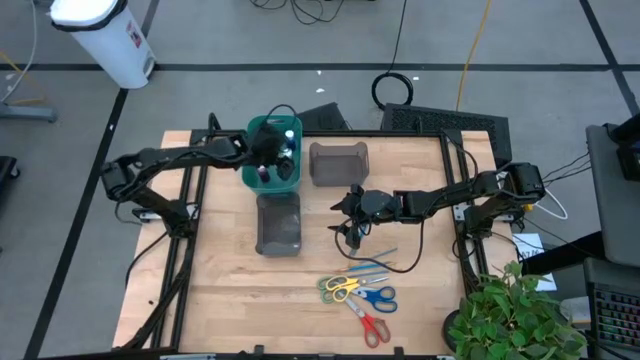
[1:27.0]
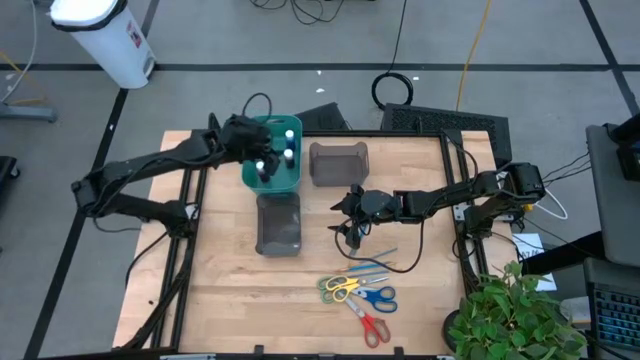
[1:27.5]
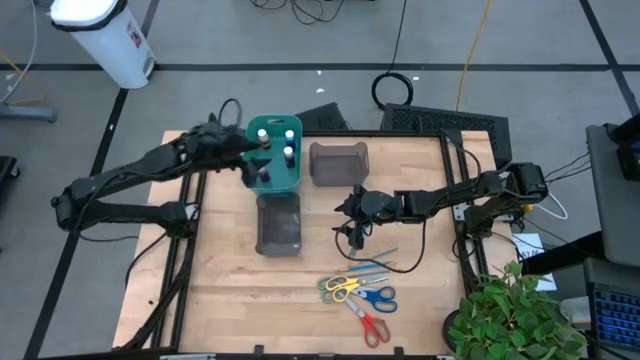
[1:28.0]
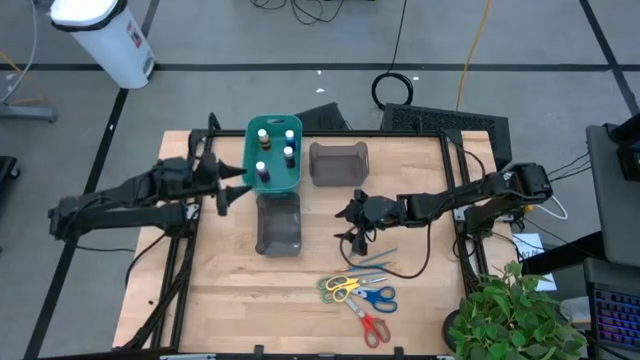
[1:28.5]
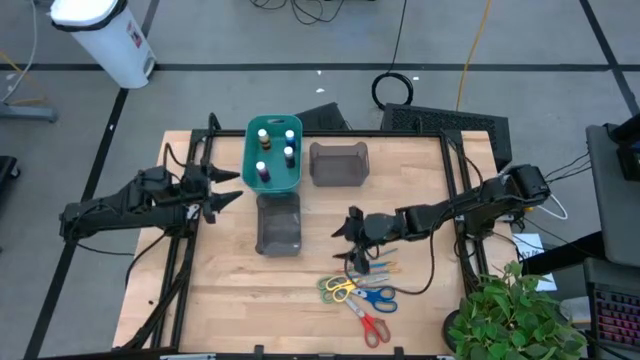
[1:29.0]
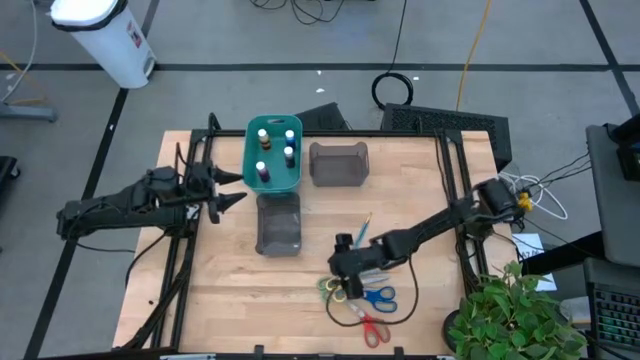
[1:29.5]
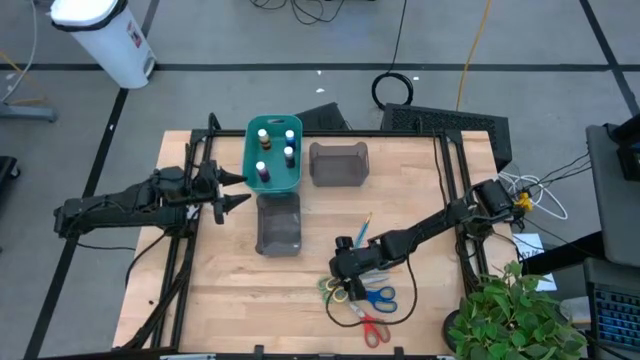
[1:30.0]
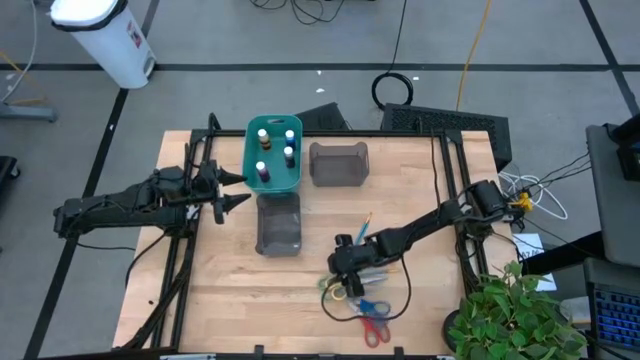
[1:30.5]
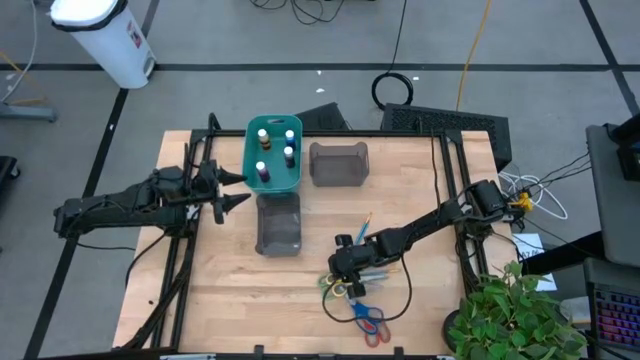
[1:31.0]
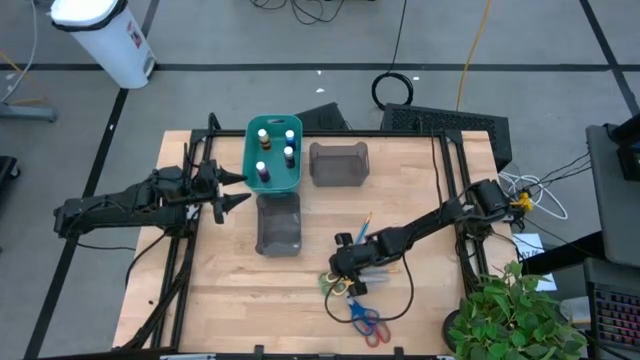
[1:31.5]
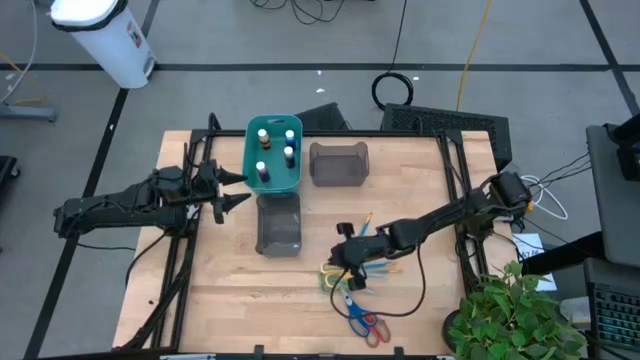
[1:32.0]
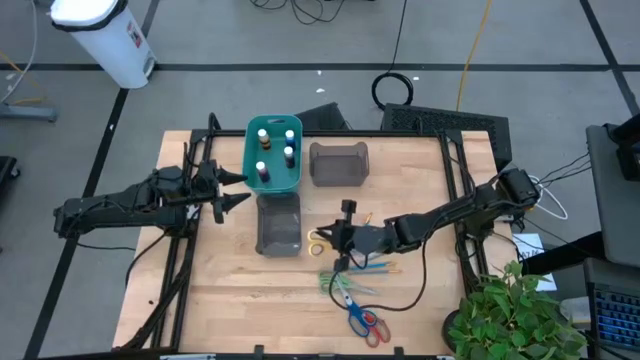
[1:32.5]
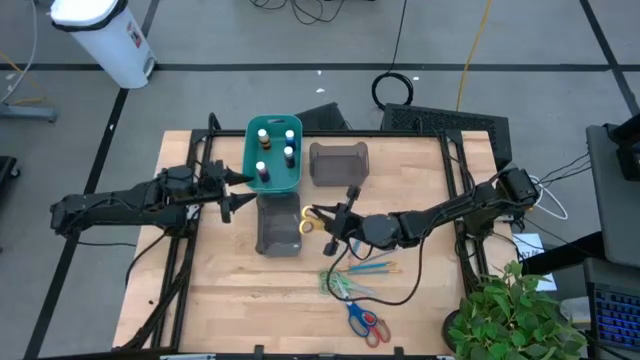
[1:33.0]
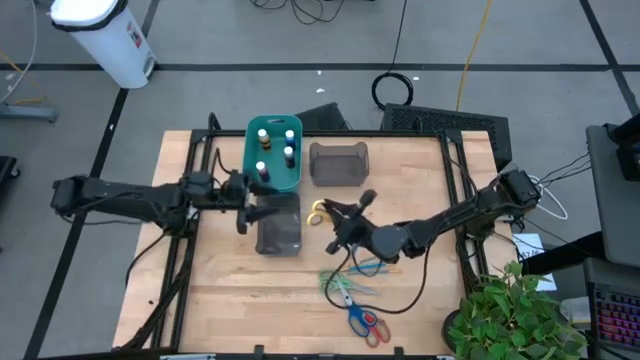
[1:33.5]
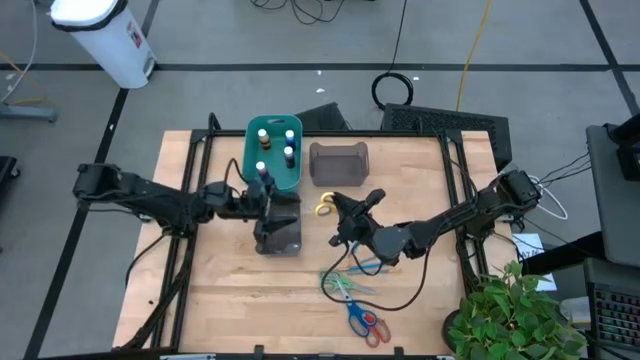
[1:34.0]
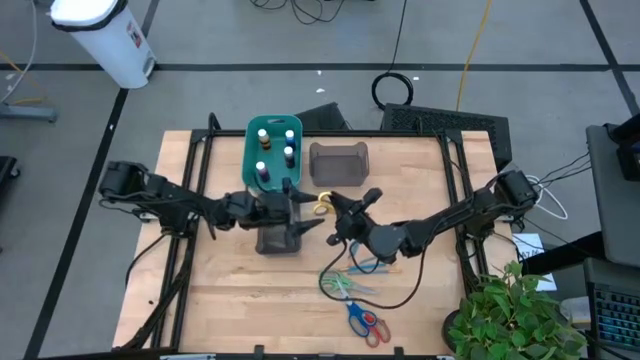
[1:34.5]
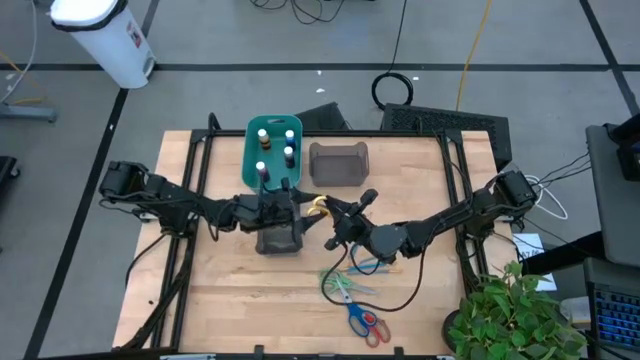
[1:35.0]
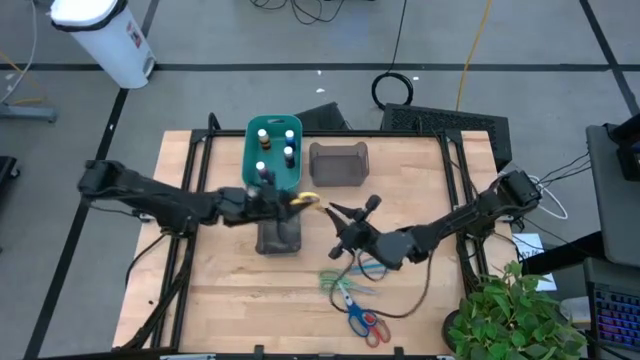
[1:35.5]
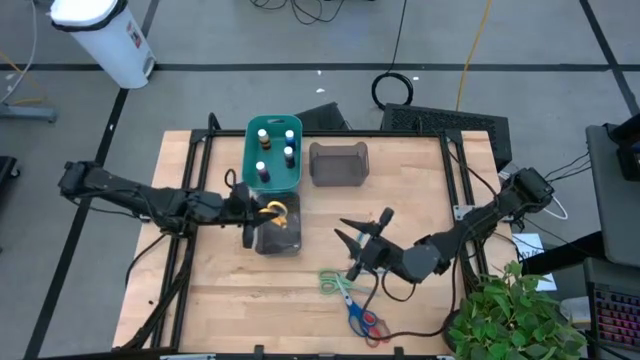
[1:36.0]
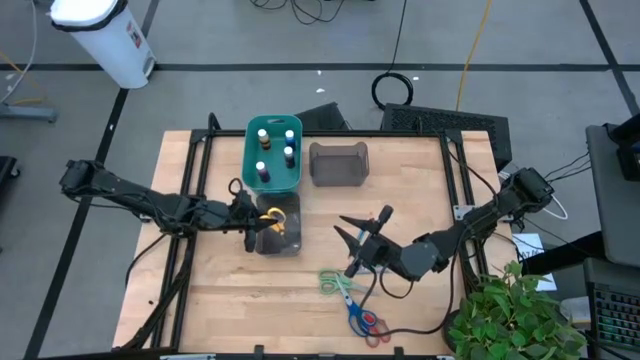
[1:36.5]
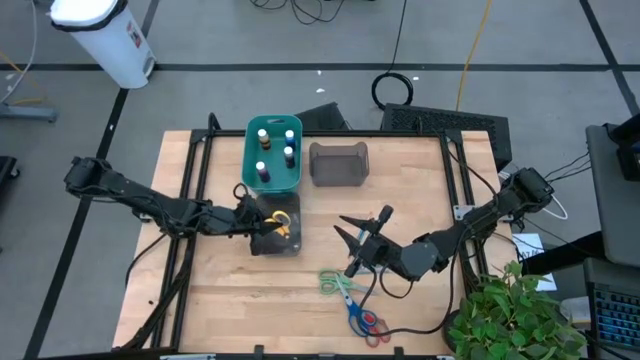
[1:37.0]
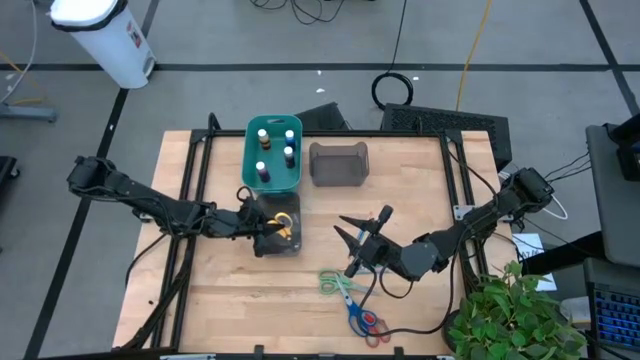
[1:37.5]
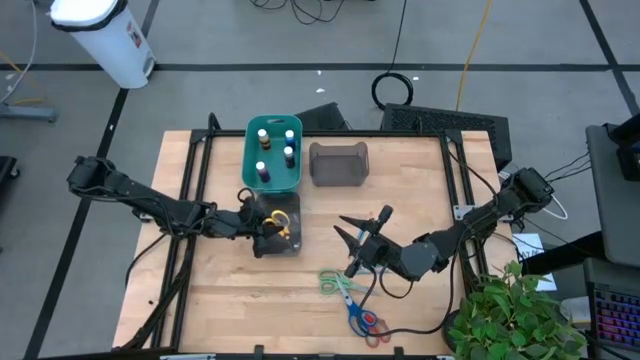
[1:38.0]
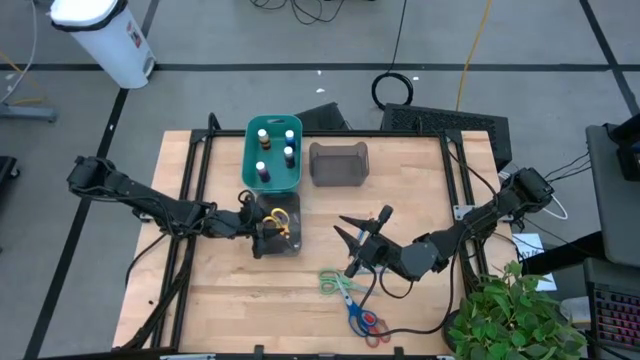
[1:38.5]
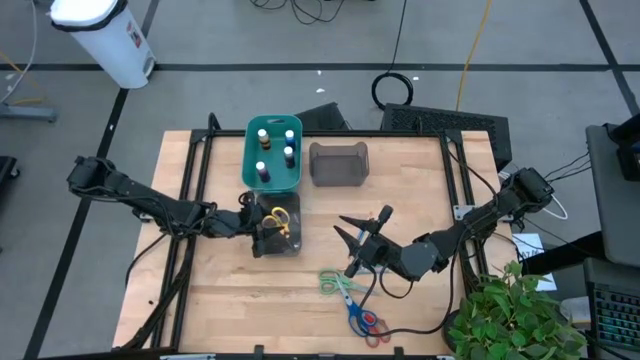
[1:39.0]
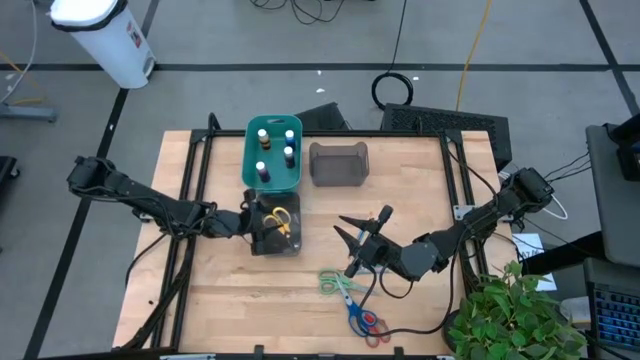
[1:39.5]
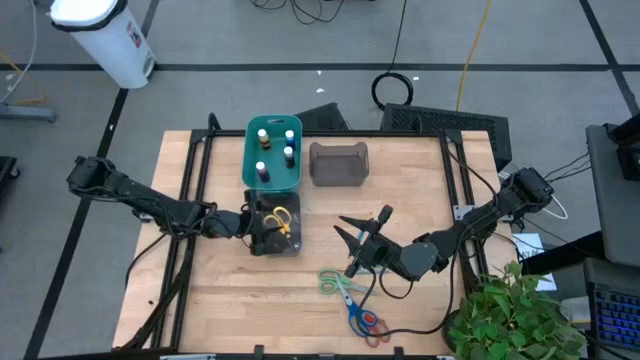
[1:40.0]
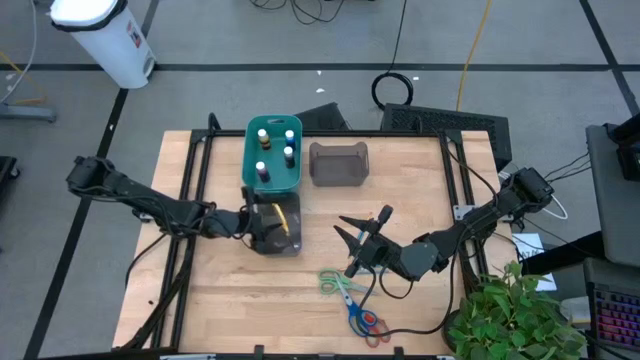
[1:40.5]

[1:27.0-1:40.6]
Task: Pick & Place Paint Supplies
Put the yellow scissors into the bottom black bin
